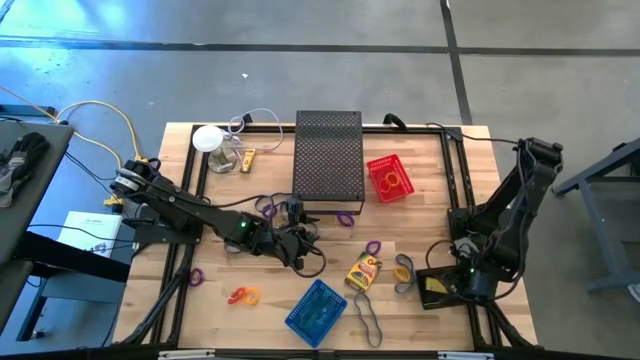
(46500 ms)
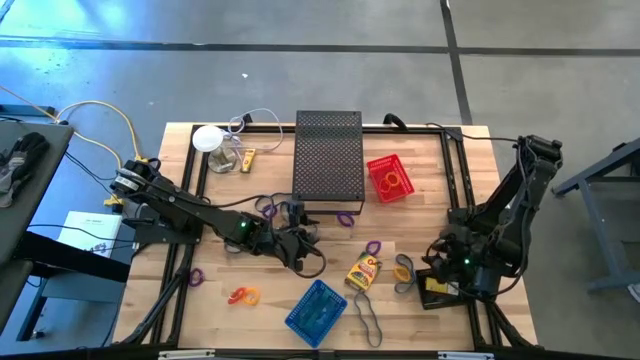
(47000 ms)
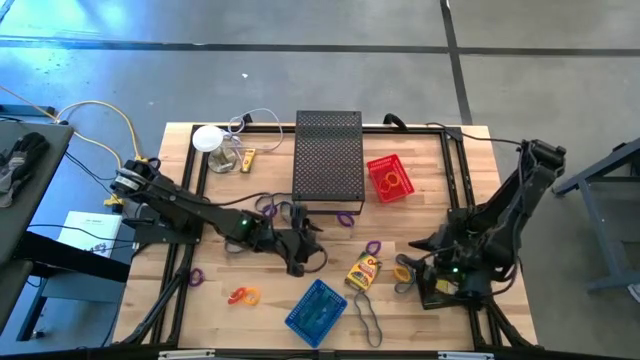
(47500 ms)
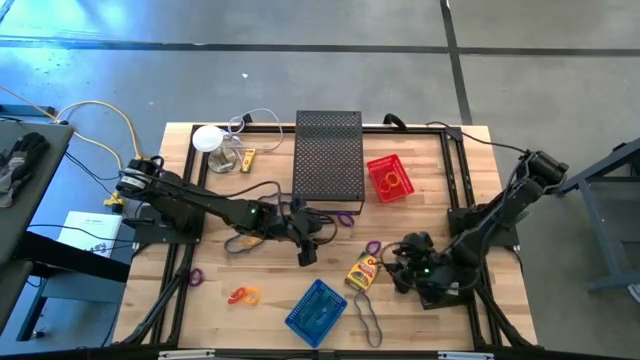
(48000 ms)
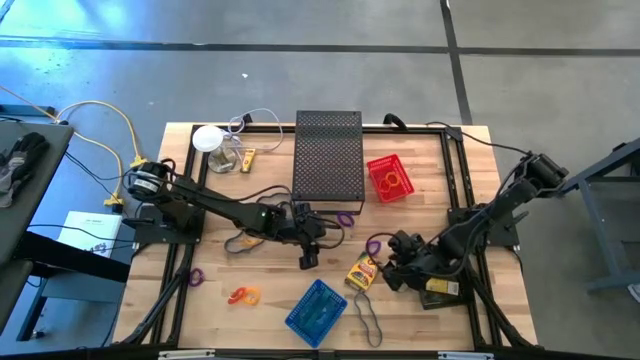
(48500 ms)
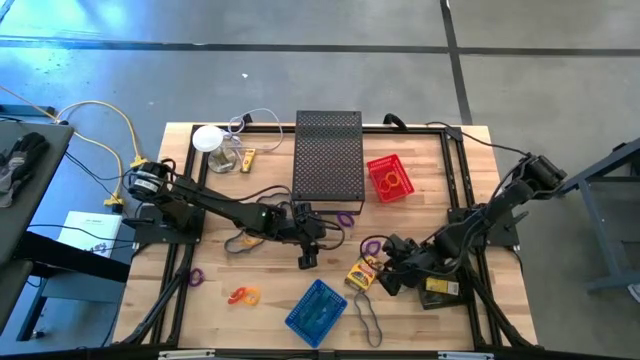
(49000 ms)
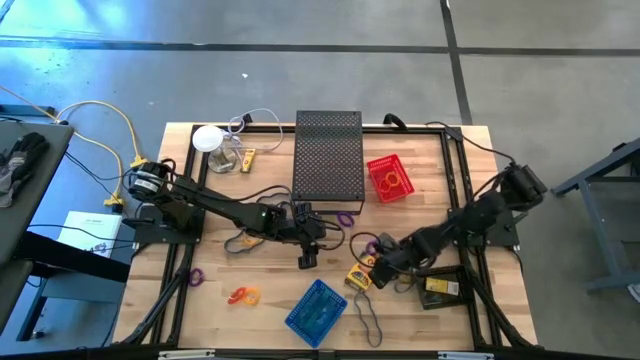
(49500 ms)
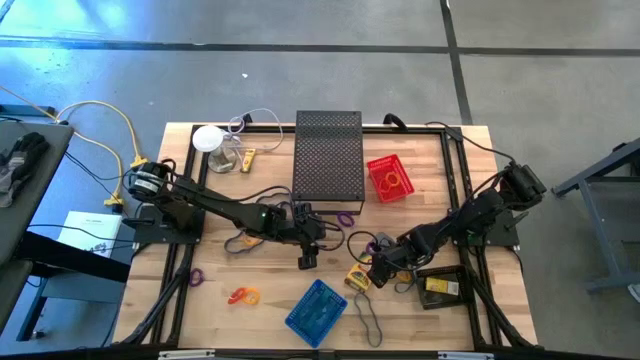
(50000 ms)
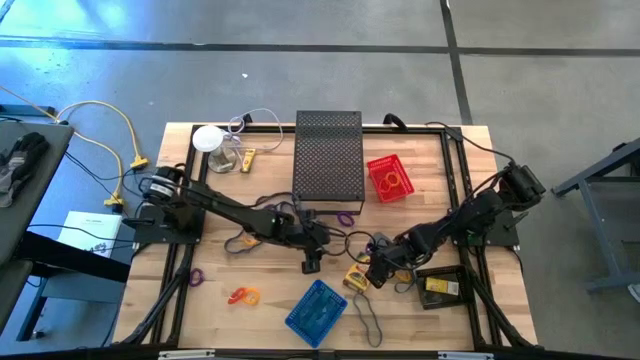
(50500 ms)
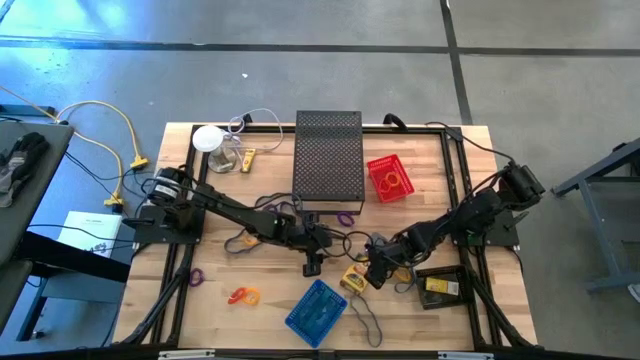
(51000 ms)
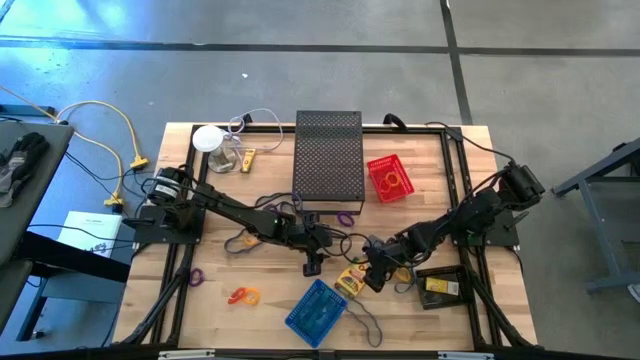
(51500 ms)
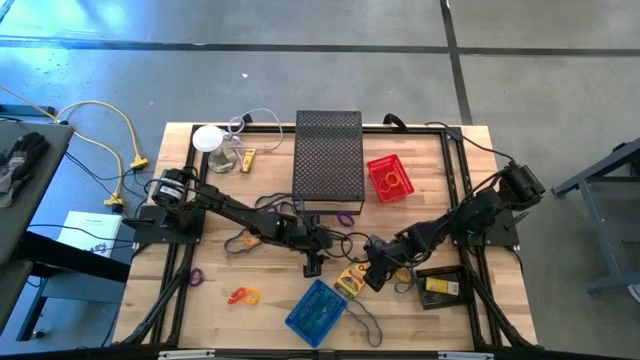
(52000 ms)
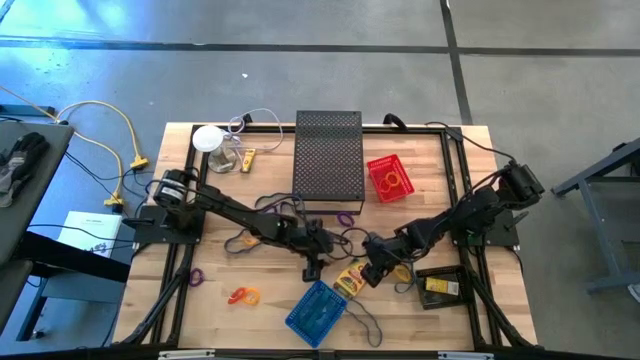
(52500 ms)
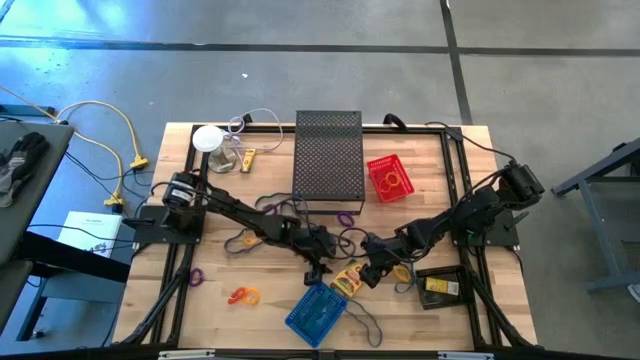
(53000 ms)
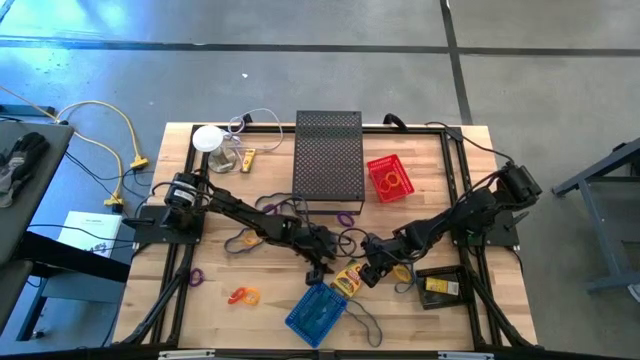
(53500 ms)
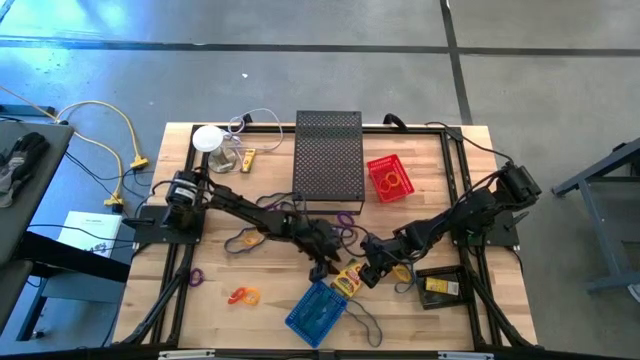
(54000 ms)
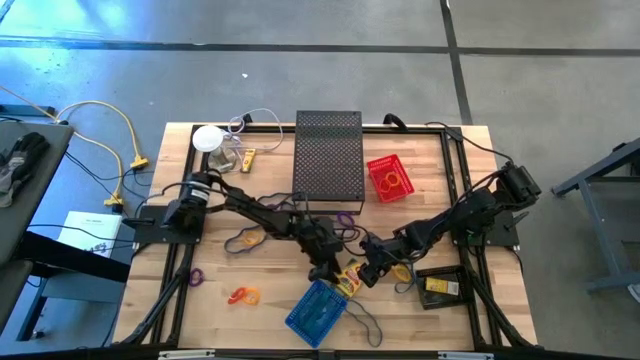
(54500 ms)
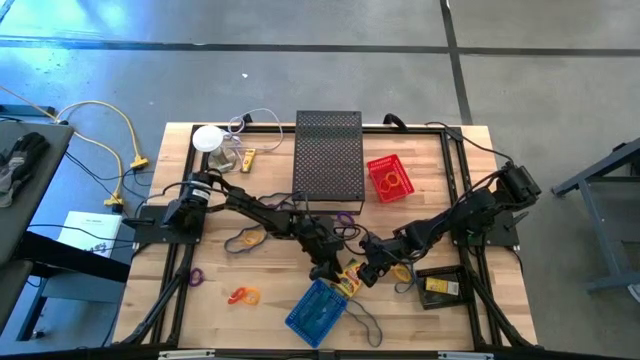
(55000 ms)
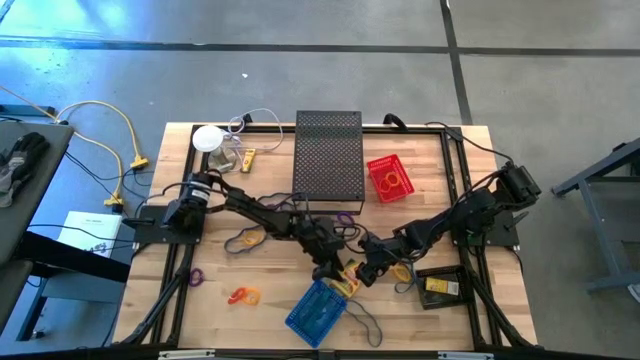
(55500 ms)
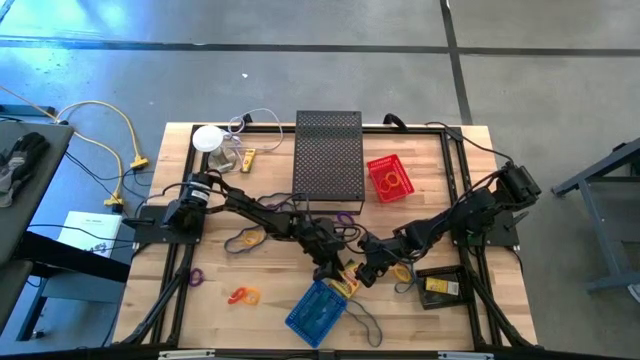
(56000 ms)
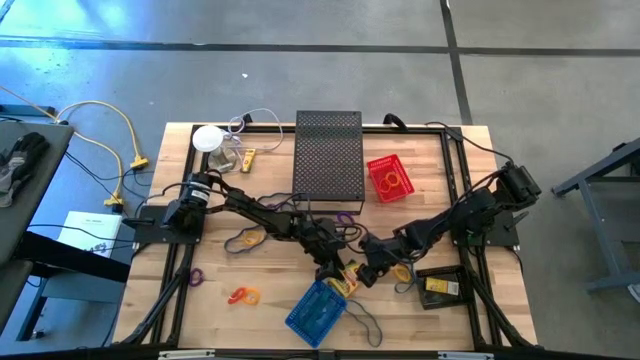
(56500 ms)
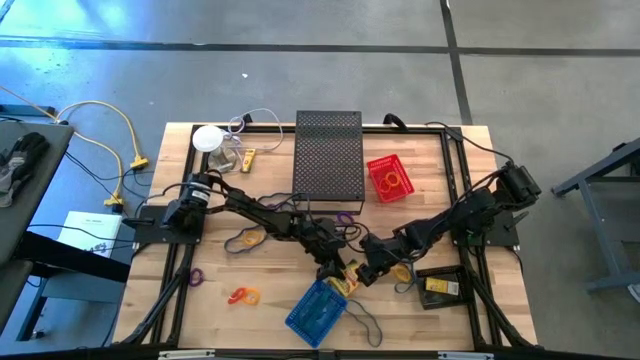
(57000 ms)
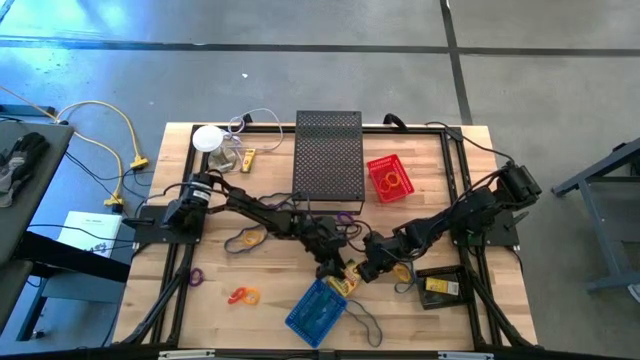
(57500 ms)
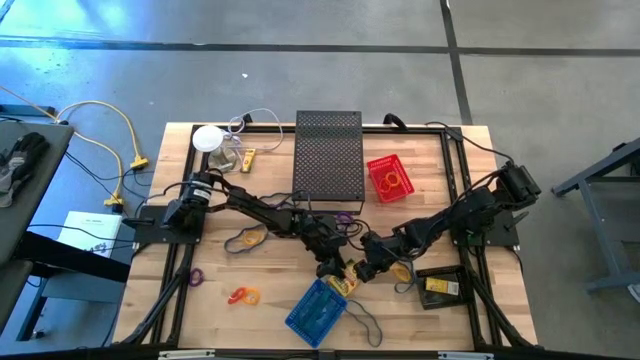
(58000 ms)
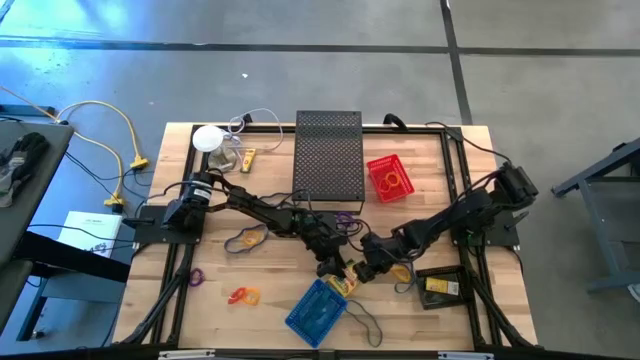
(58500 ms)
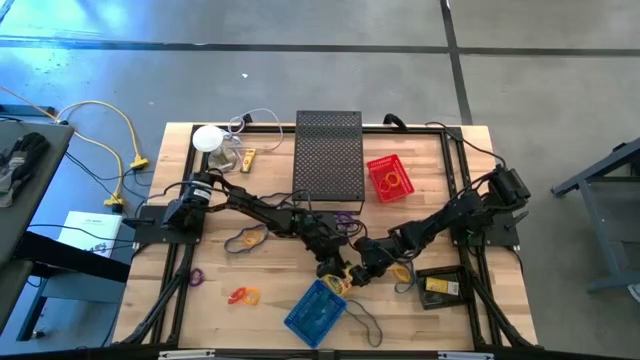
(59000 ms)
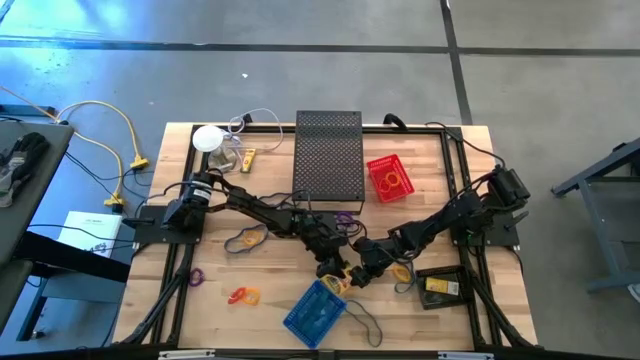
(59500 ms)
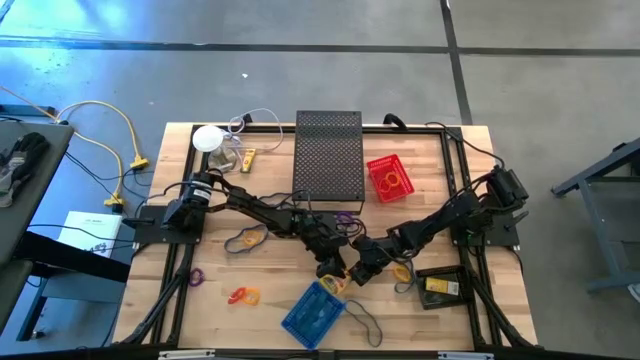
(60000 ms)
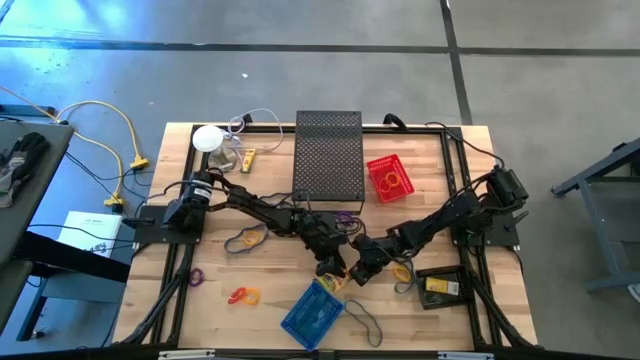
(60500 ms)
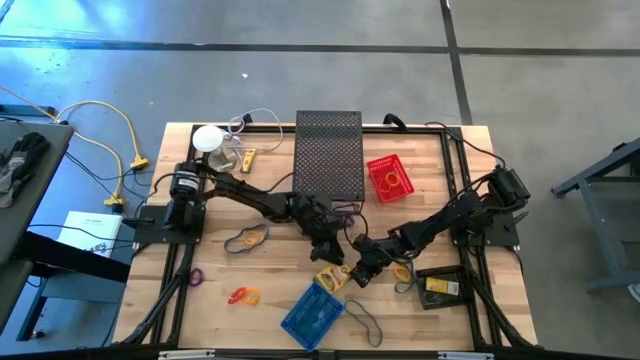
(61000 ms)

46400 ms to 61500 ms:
Task: Pick & Place Office Desk Supplies
Put the crayon box into the black bin

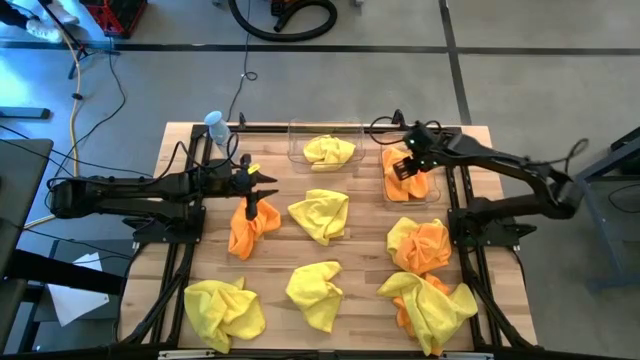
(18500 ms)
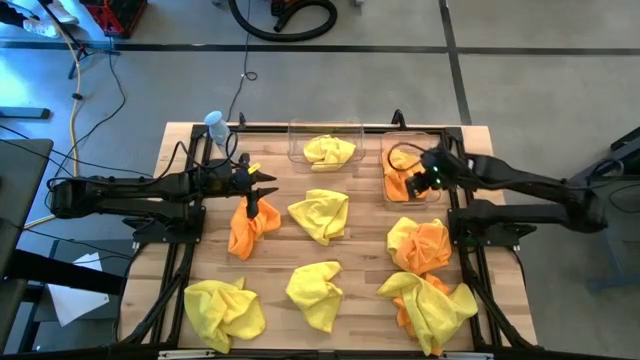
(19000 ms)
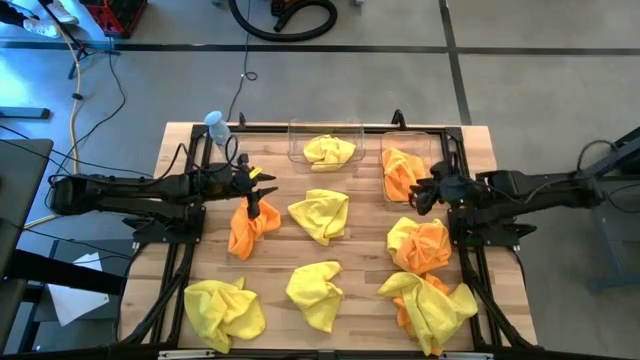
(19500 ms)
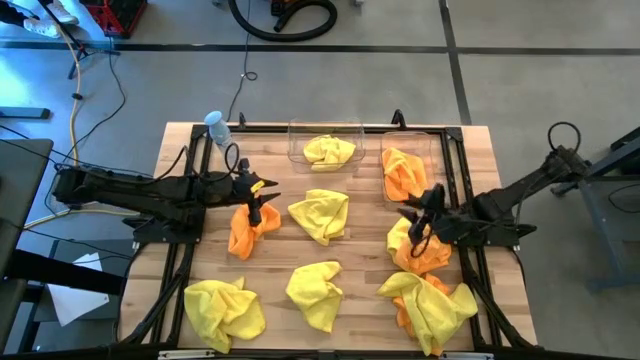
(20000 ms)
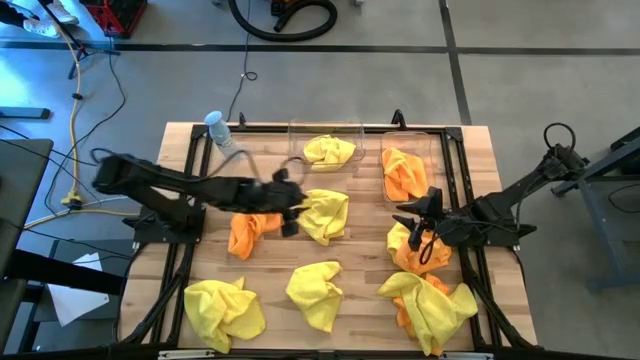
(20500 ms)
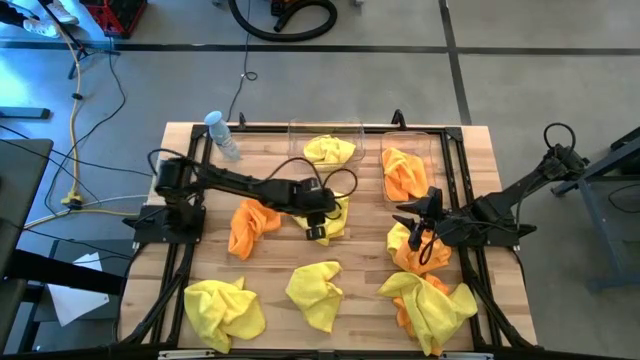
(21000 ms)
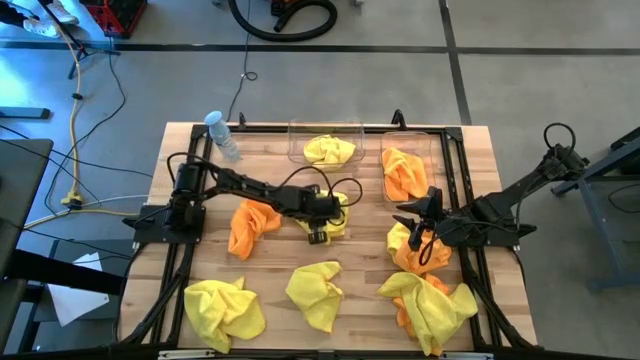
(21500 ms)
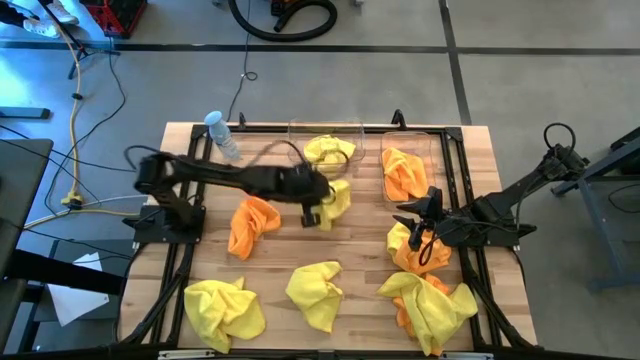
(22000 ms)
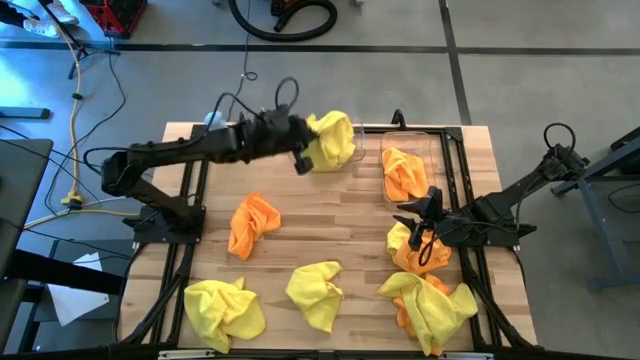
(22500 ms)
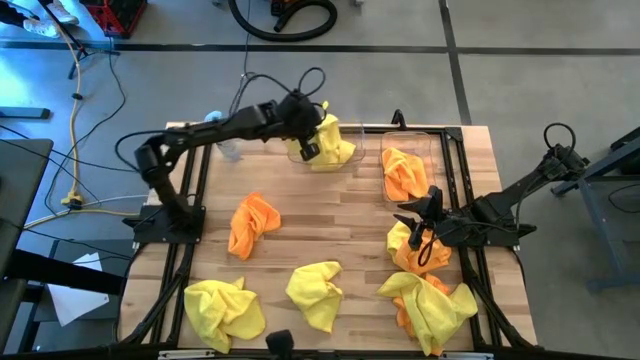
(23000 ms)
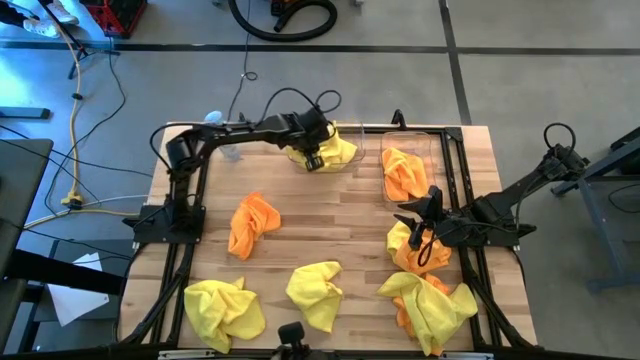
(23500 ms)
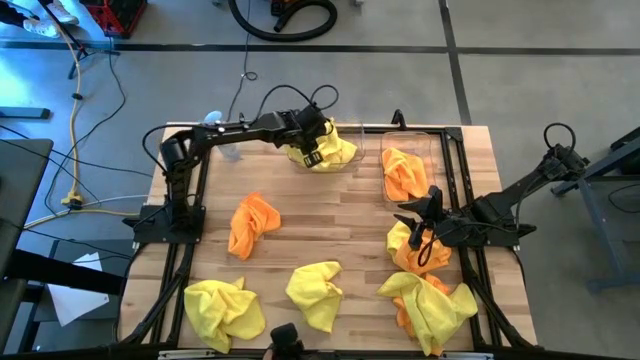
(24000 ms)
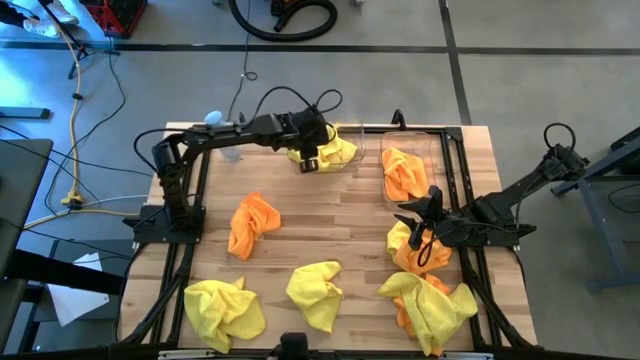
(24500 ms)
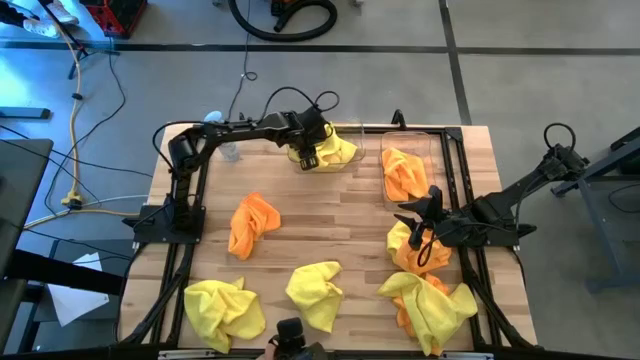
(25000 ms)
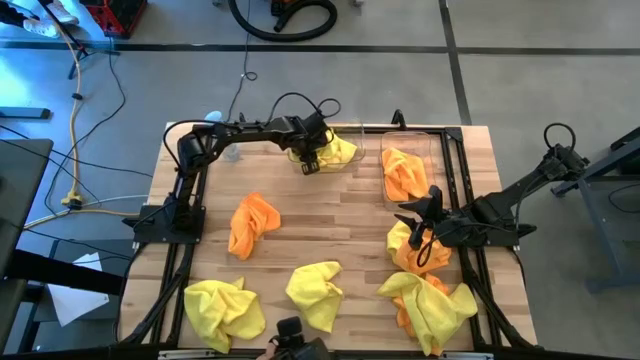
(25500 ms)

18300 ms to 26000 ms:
Task: Sort microfiber towel by color & place in baskets
Put the yellow microfiber towel into the left transparent bin
